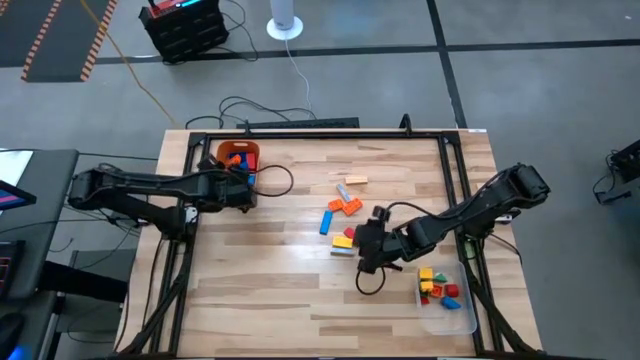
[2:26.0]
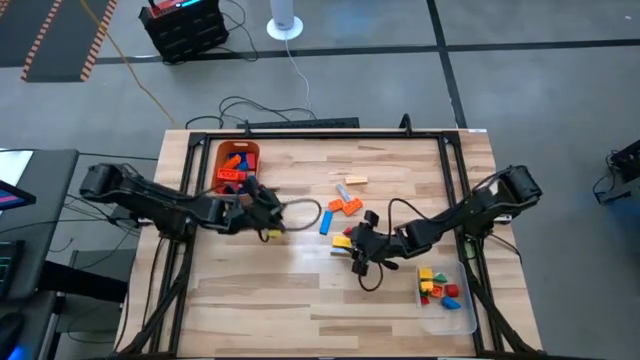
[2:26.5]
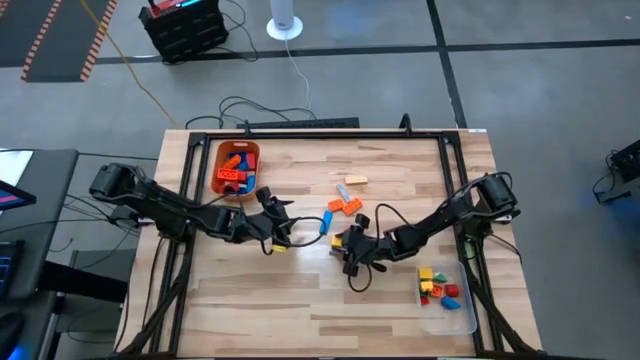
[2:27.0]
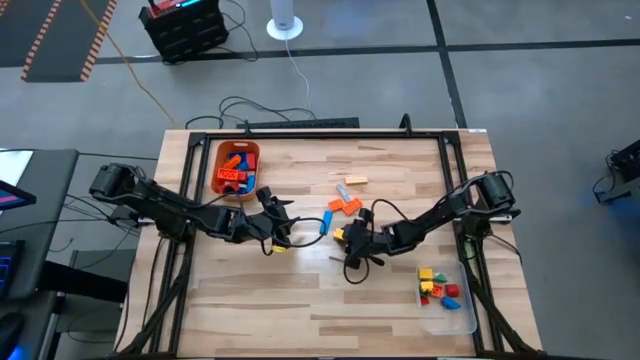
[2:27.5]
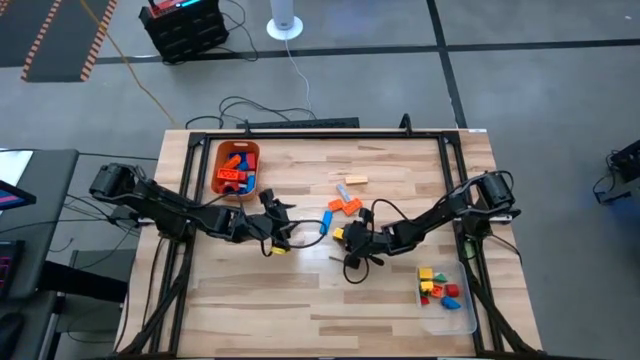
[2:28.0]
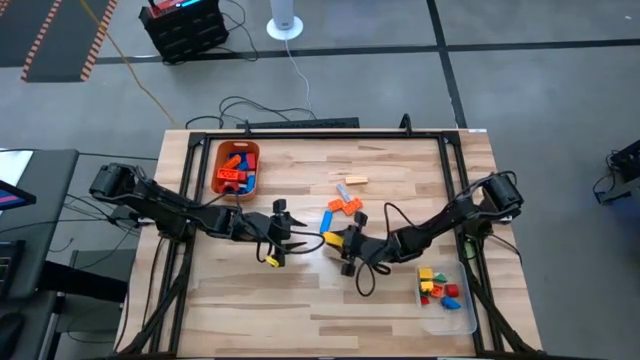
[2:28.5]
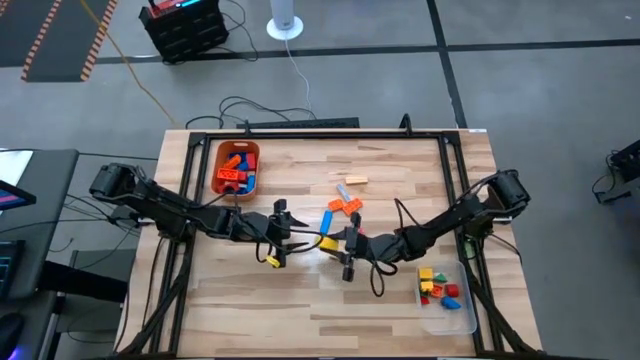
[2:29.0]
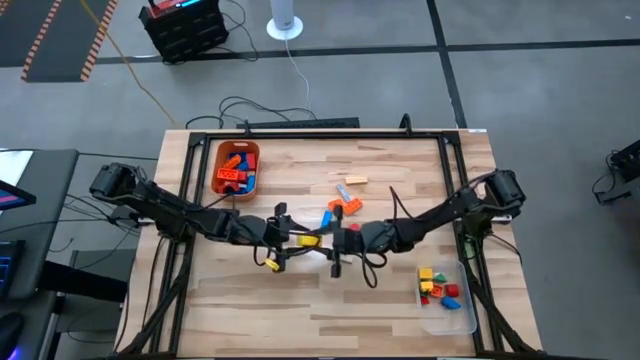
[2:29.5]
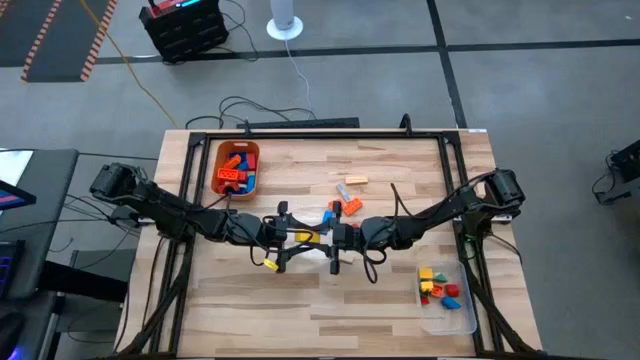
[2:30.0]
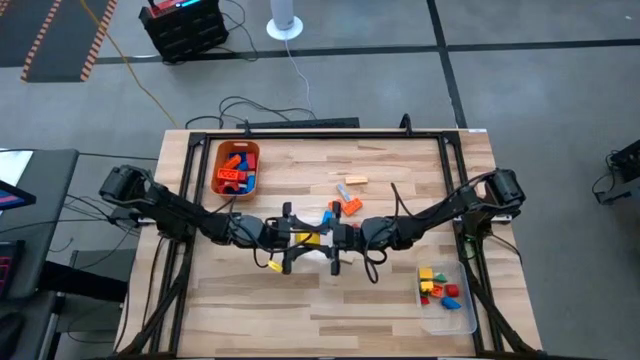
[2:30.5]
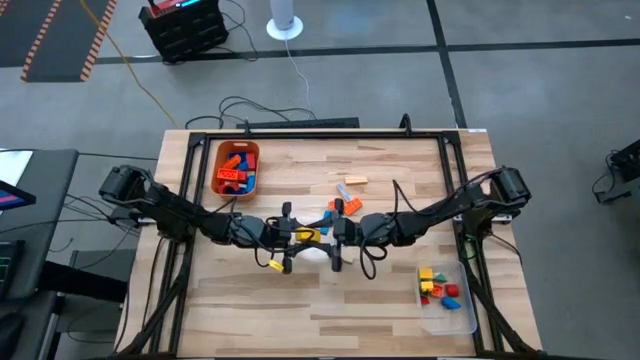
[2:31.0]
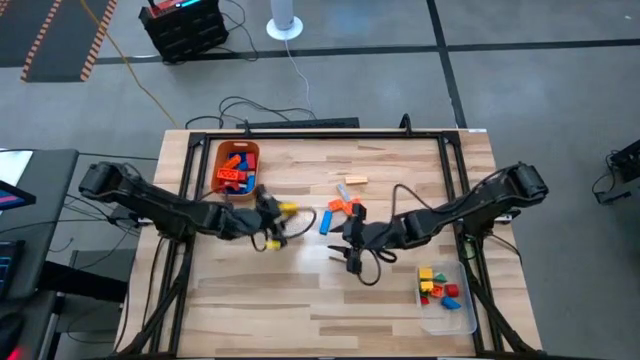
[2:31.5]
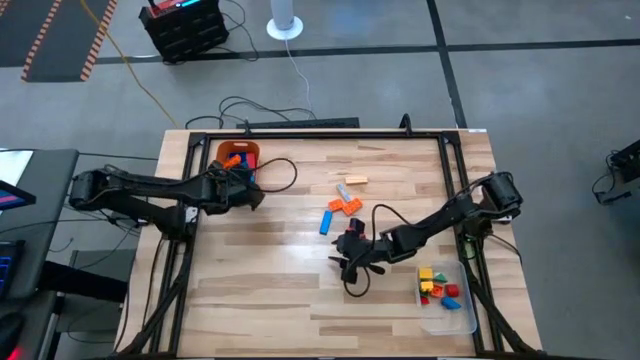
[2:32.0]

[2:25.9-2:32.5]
Task: Sort blocks by size
Put the large yellow wooden block into the orange bin

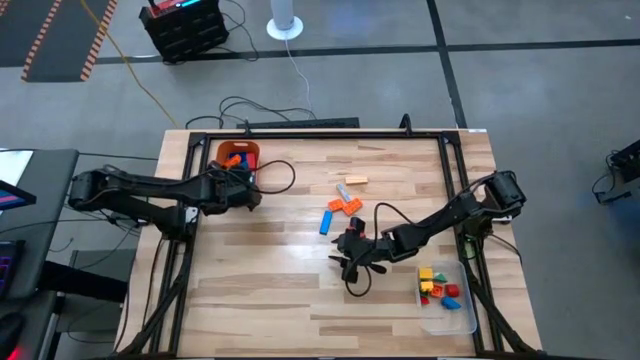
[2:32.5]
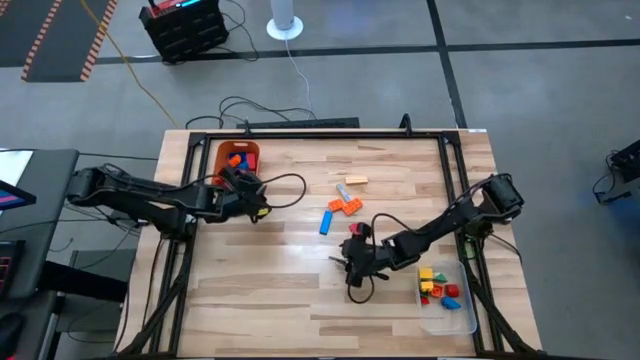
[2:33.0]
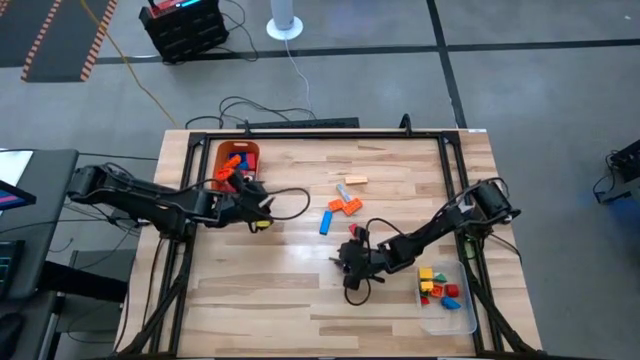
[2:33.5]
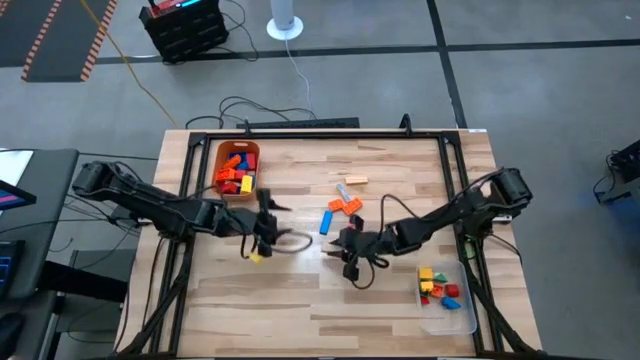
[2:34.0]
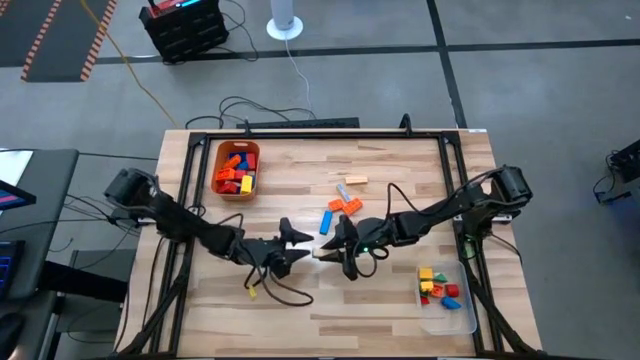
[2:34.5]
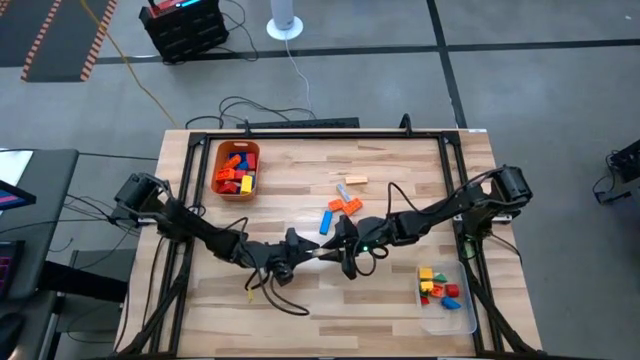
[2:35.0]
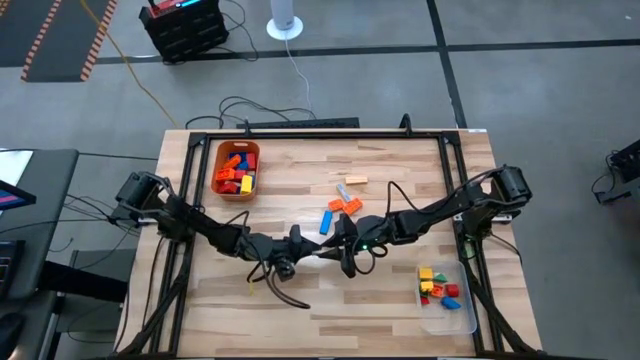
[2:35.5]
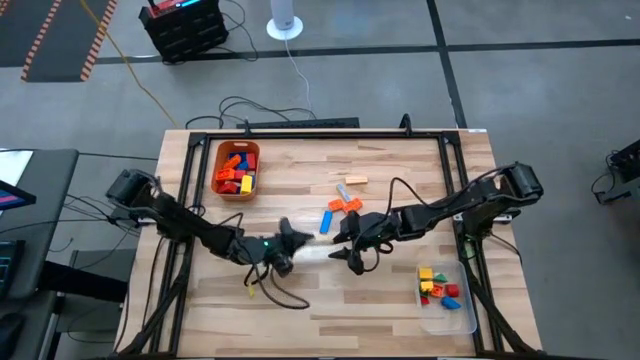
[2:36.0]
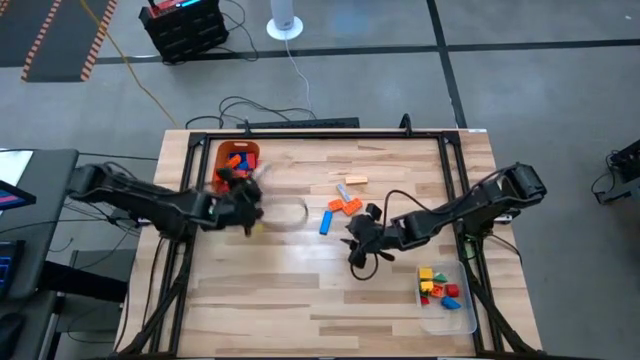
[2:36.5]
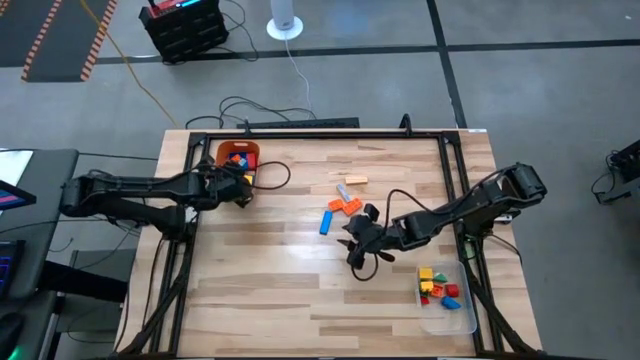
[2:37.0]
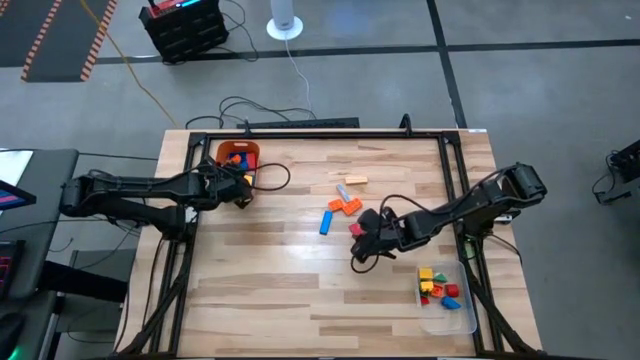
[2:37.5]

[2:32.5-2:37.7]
Put the large brown wooden block into the orange bin

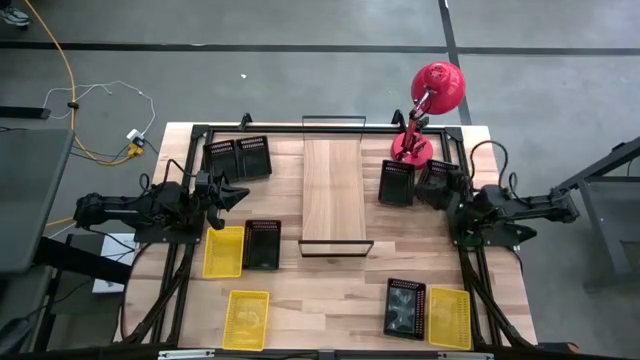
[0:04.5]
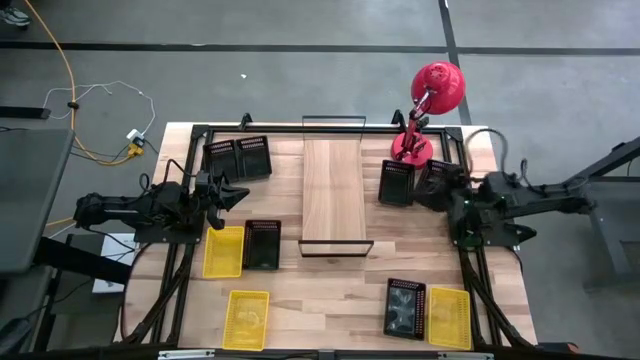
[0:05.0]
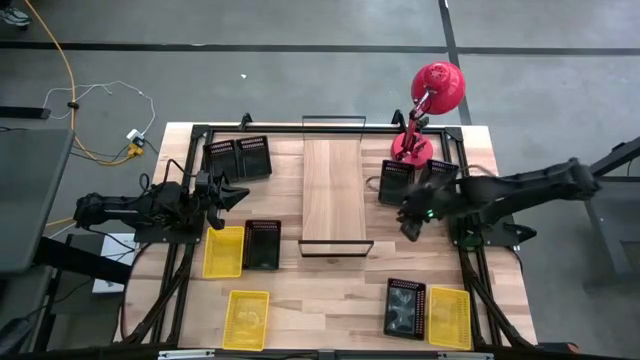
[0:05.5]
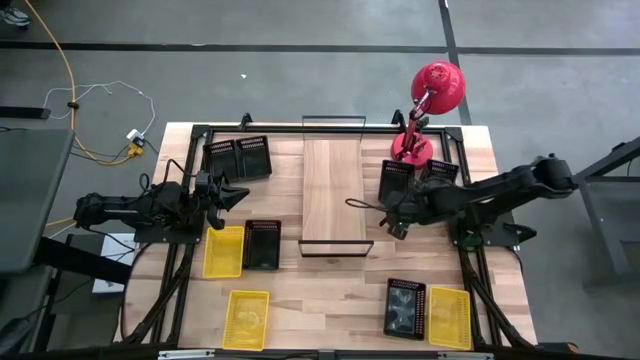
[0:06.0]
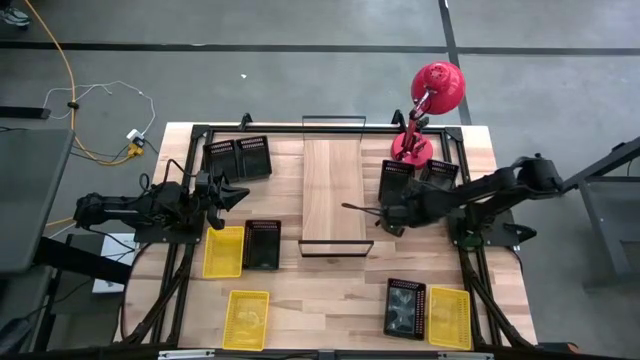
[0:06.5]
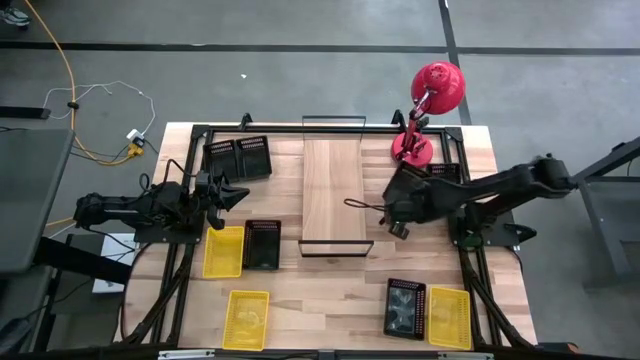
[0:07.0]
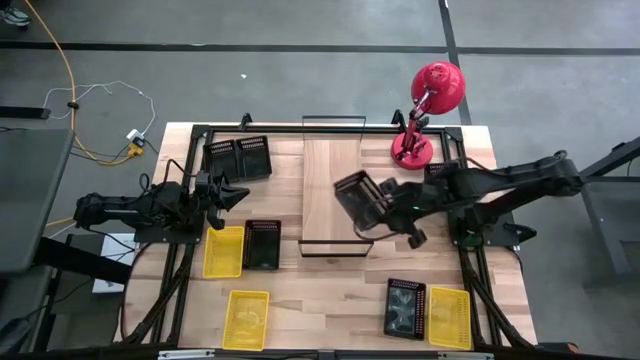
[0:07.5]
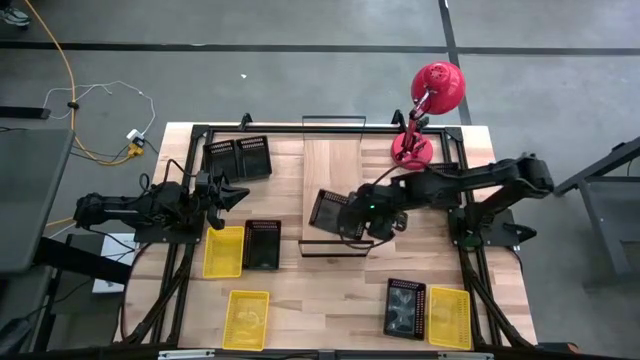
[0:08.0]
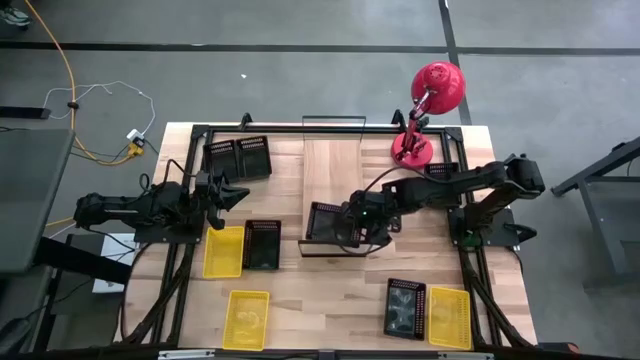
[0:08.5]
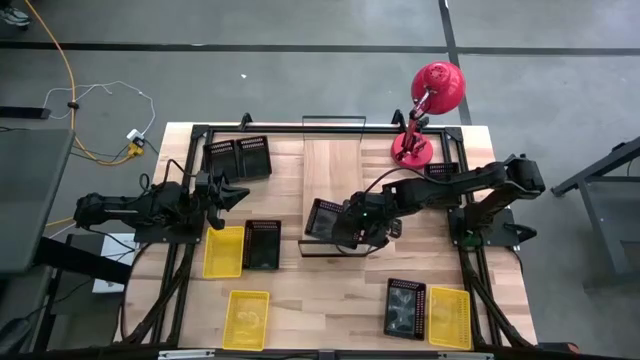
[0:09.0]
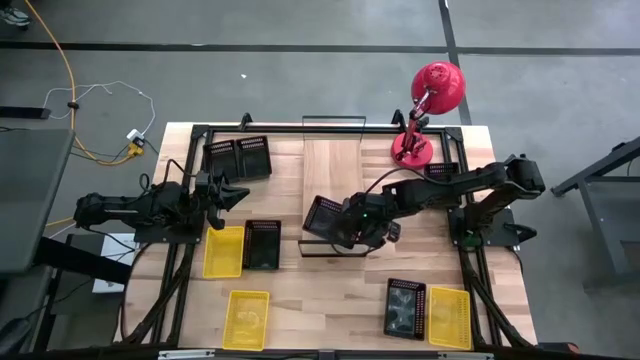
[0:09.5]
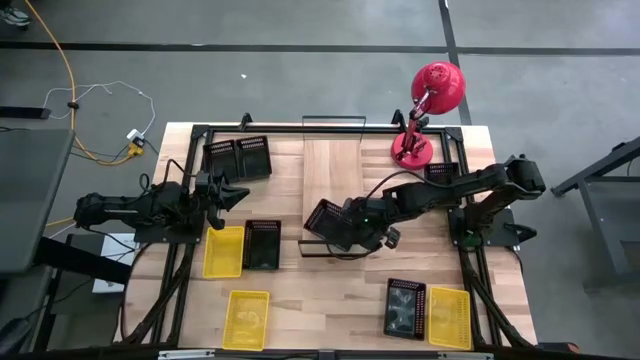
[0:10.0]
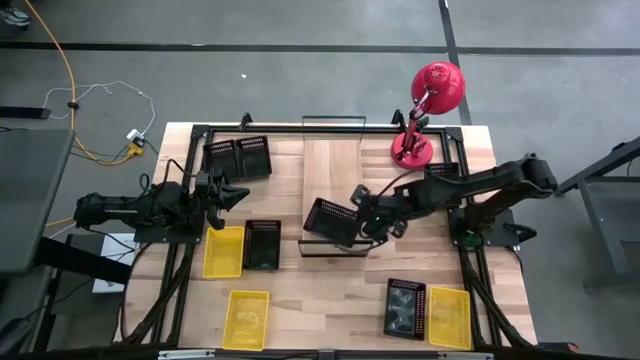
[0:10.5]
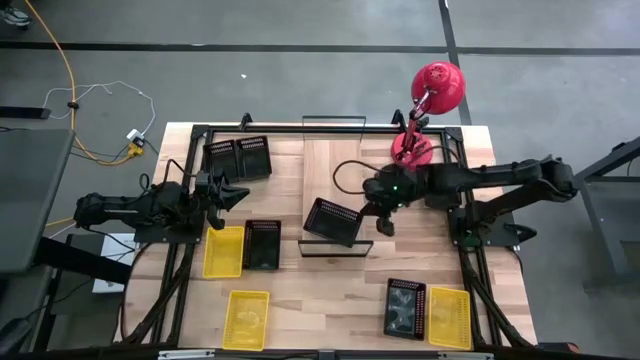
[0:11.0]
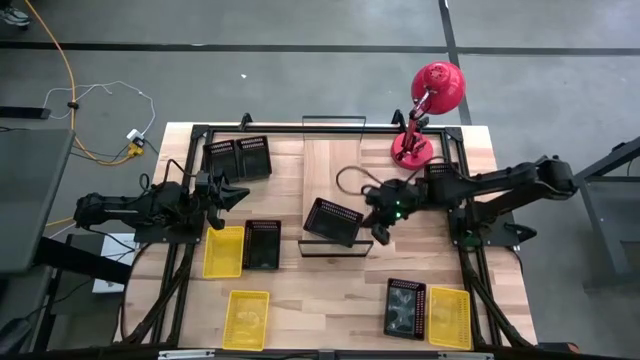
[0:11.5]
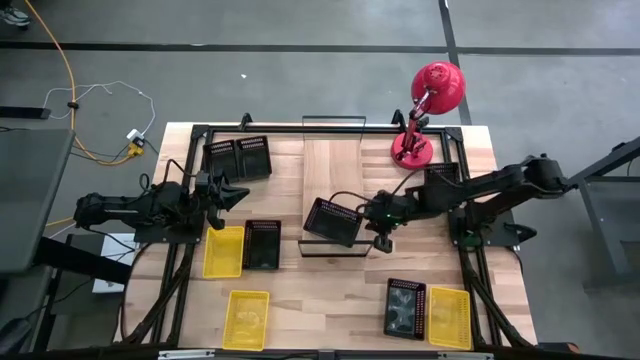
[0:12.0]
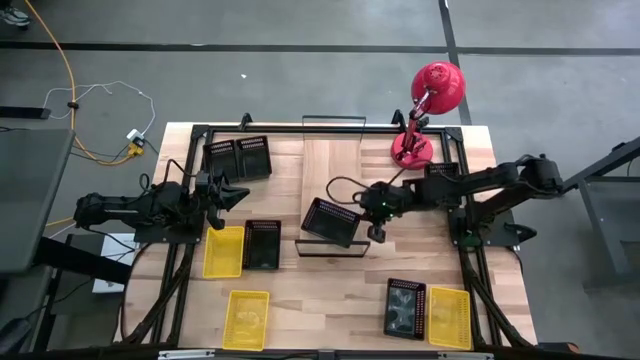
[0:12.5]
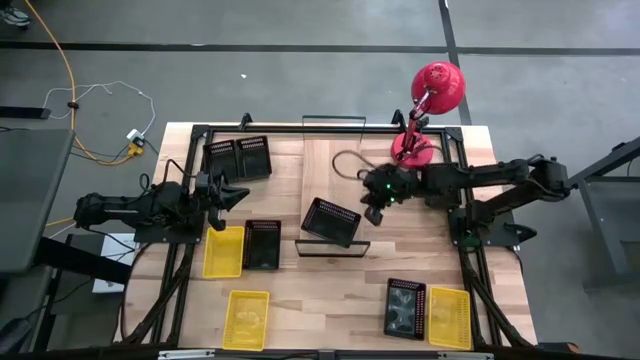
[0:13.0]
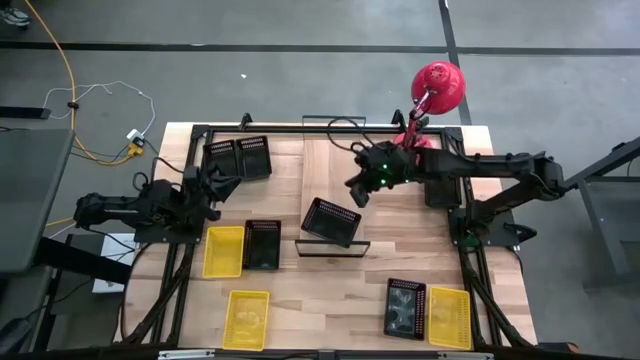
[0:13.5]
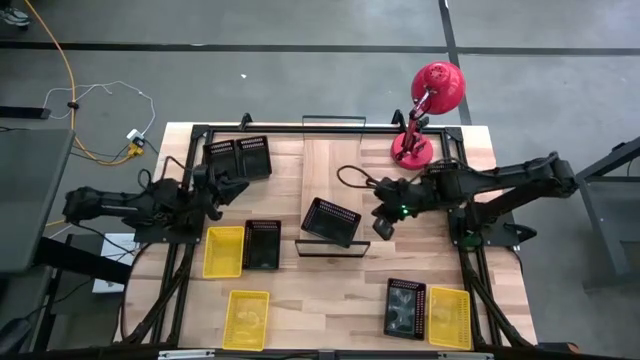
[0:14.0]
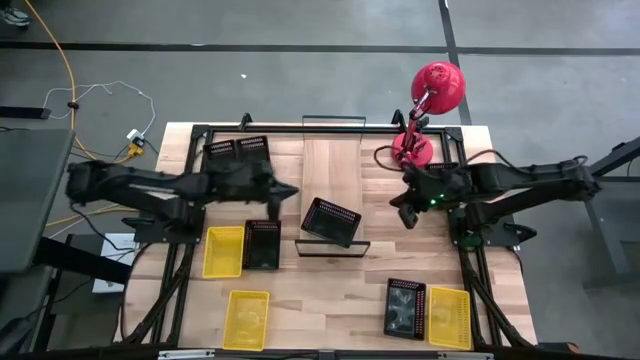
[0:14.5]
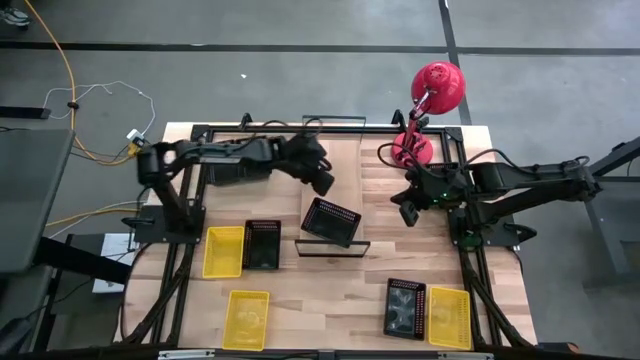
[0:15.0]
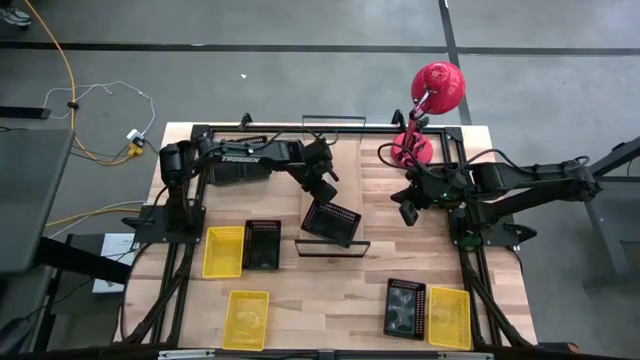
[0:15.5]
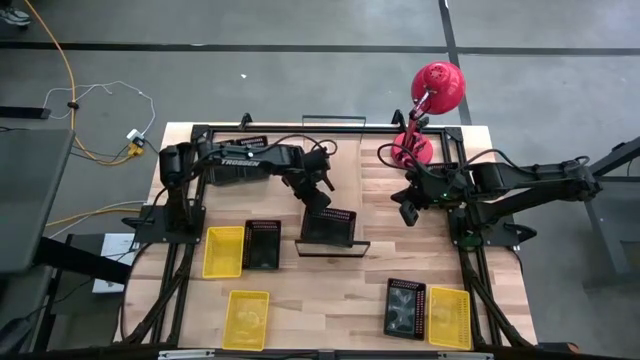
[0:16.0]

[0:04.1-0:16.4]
Task: Stack baskets on shelf by color
Put the black bin on the shelf
